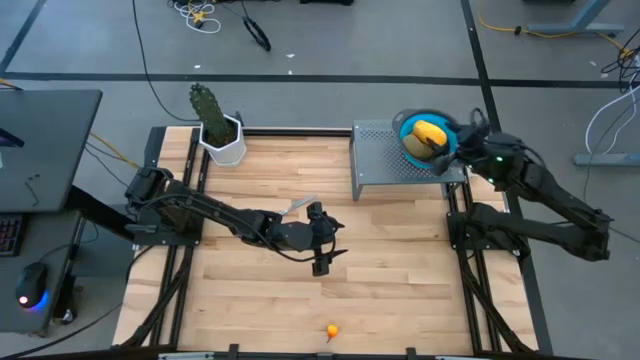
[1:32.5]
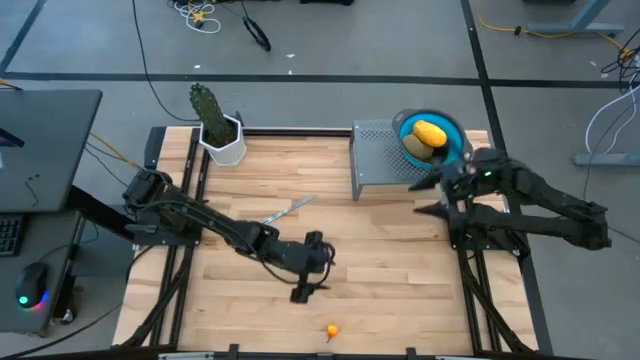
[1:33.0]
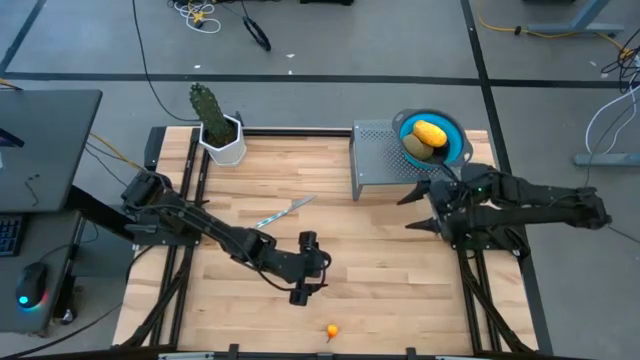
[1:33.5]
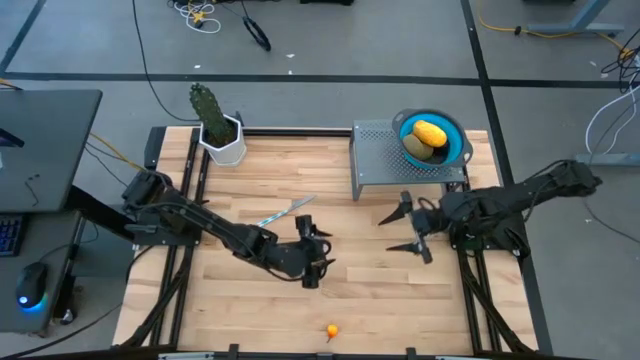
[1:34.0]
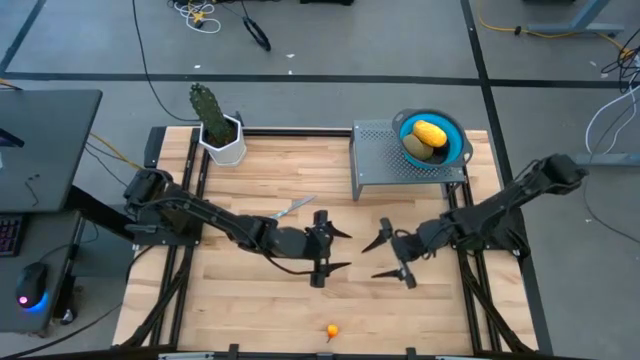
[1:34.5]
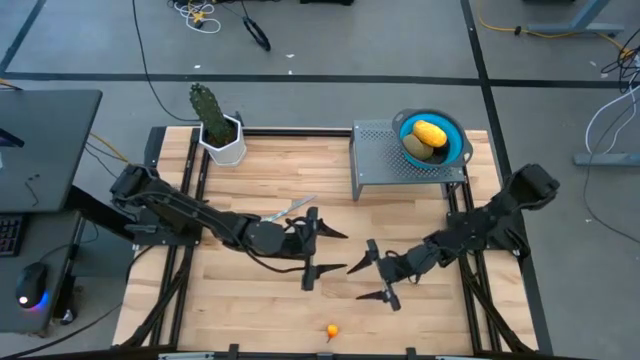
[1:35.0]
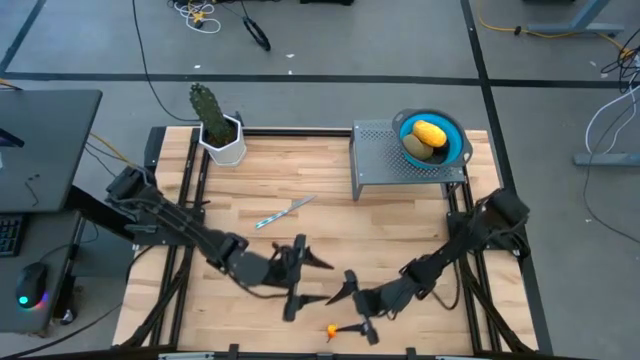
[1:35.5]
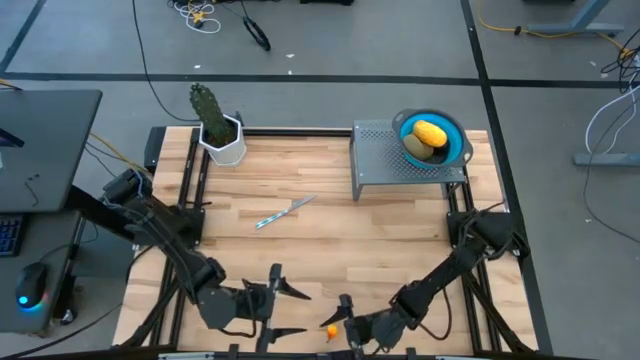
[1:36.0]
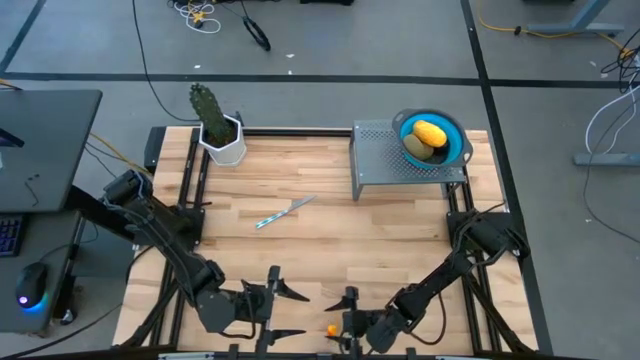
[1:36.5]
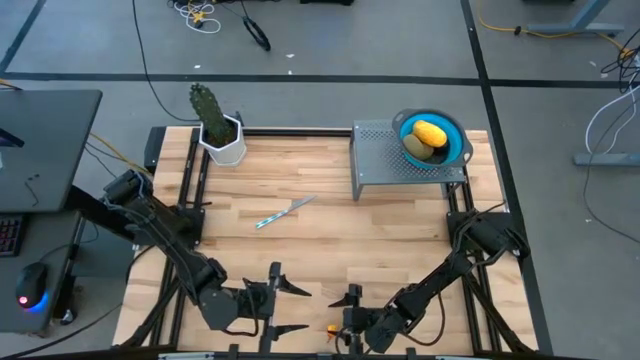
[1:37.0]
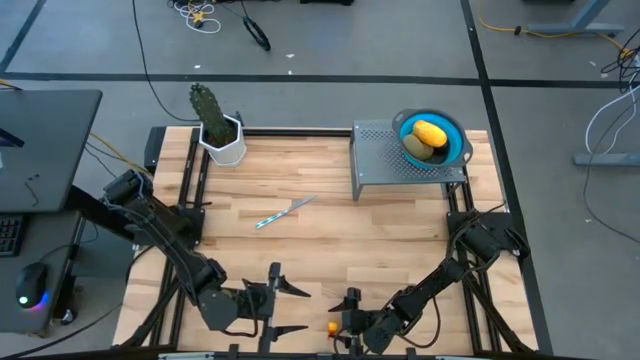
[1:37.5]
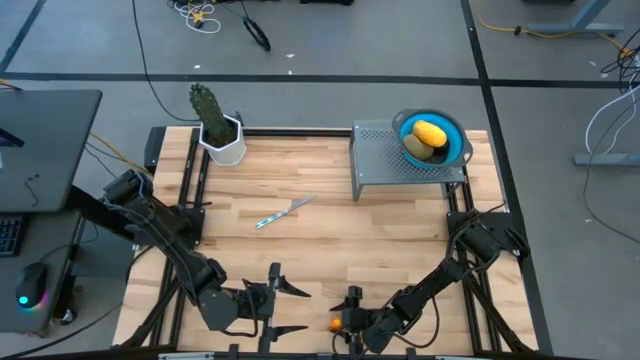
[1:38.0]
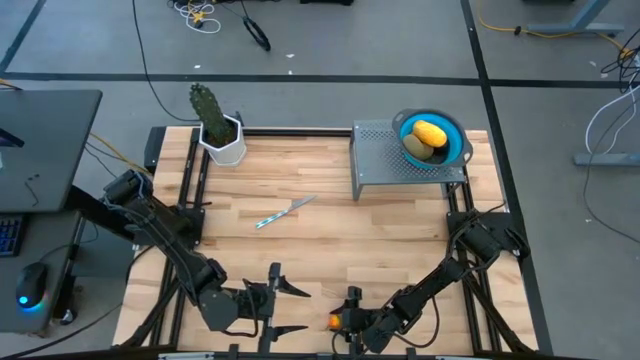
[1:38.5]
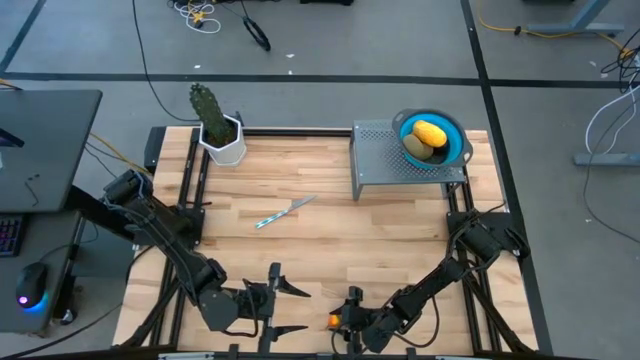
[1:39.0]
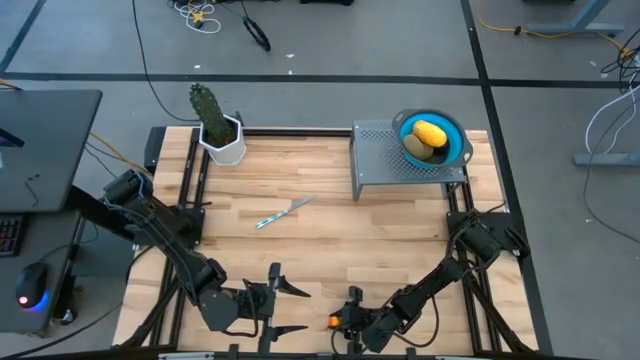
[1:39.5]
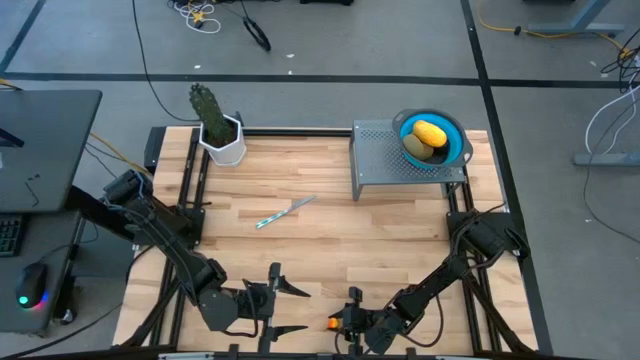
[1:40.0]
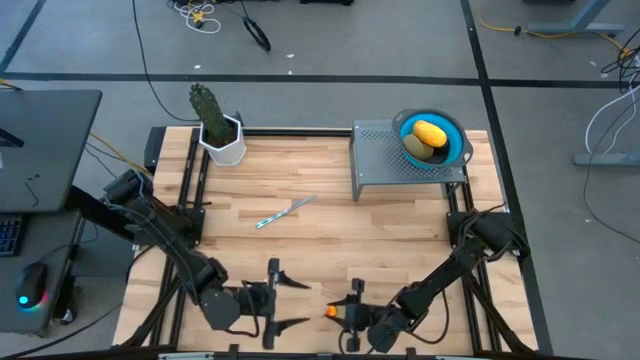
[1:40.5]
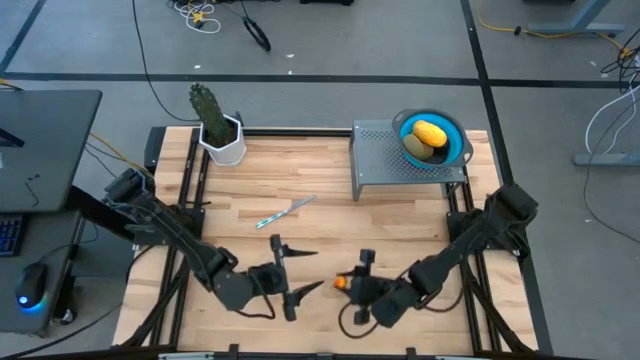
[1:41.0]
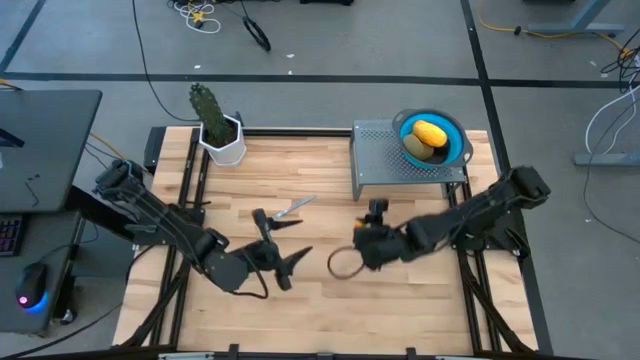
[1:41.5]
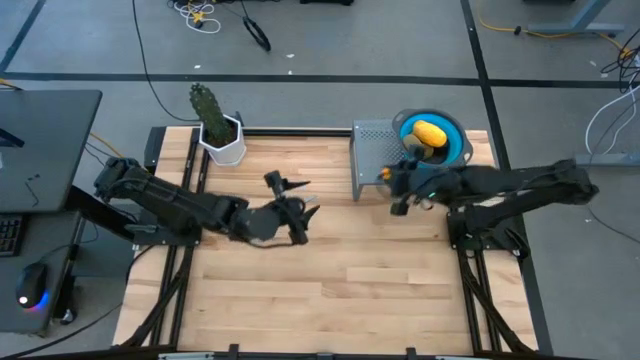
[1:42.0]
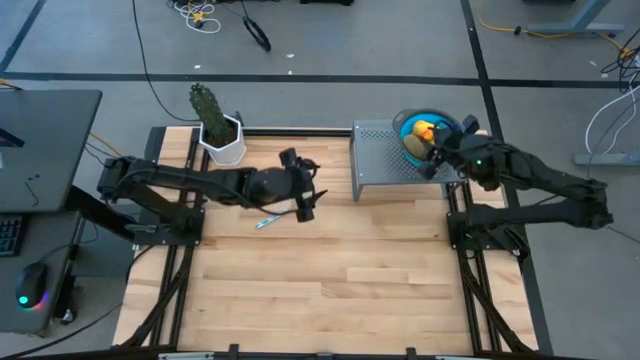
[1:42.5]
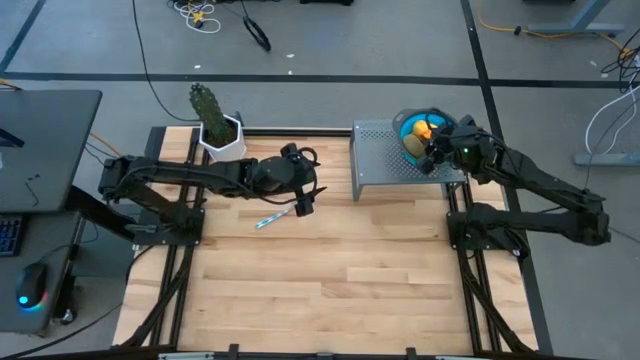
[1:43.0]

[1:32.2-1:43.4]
Task: Pick & Place Fruit
Put the pear into the blue strainer bowl on the shelf

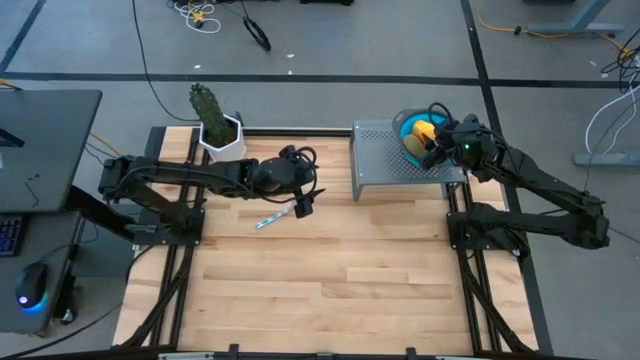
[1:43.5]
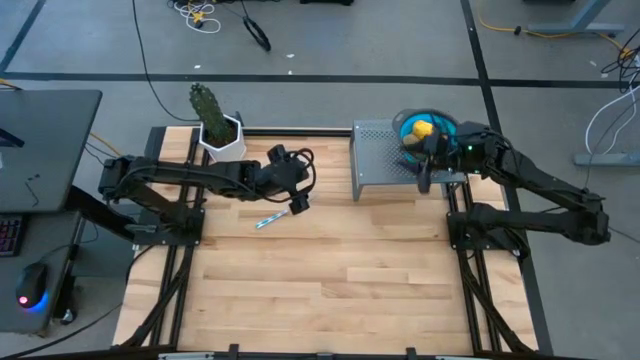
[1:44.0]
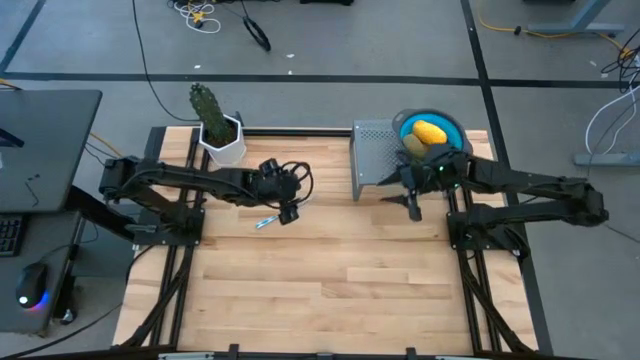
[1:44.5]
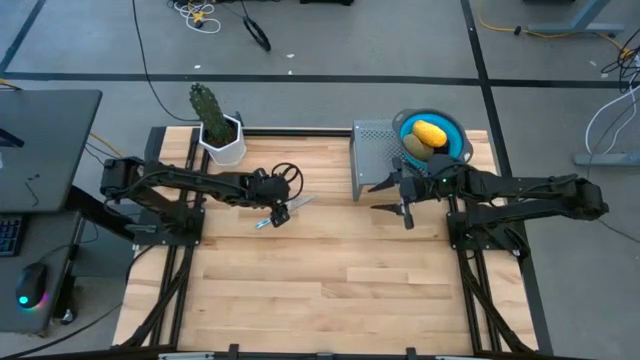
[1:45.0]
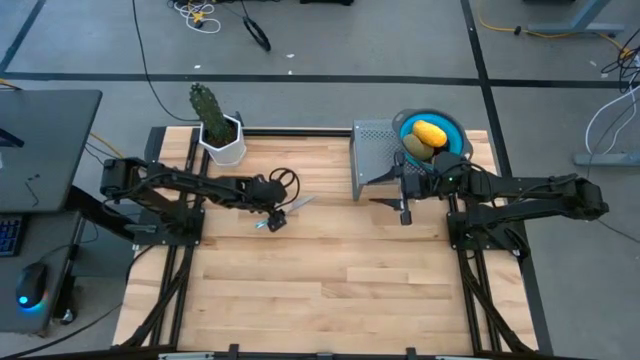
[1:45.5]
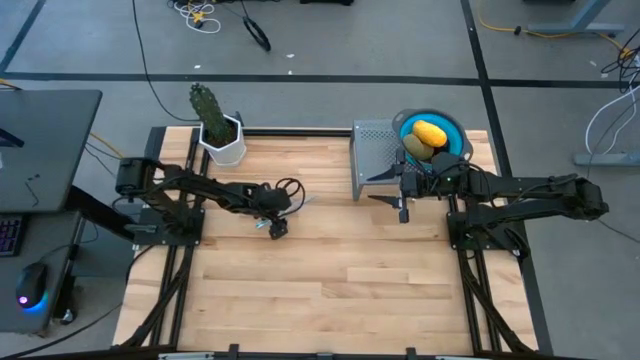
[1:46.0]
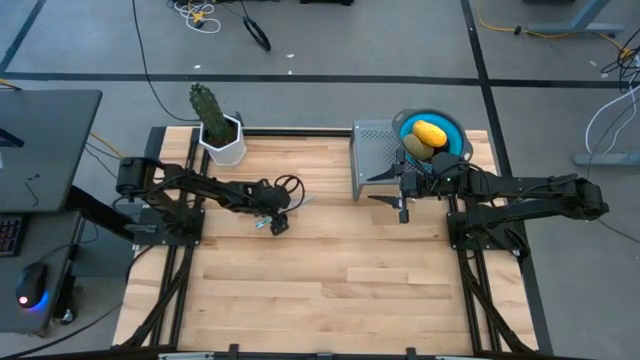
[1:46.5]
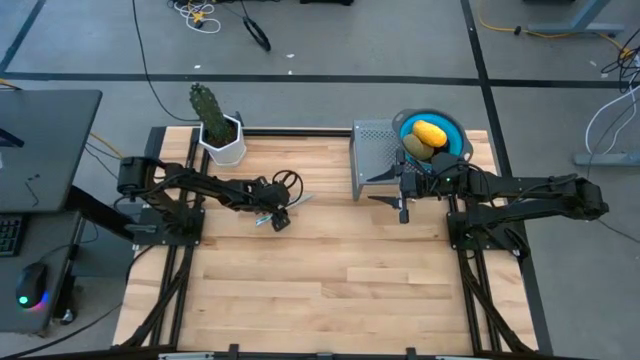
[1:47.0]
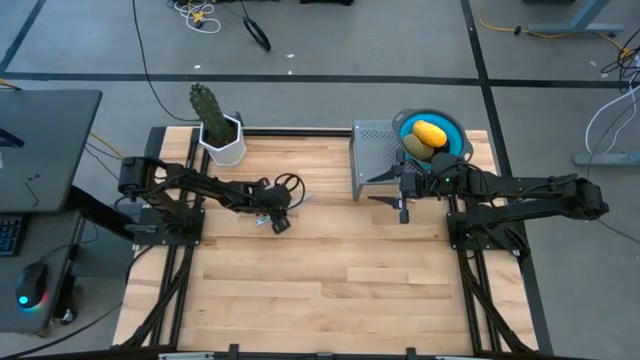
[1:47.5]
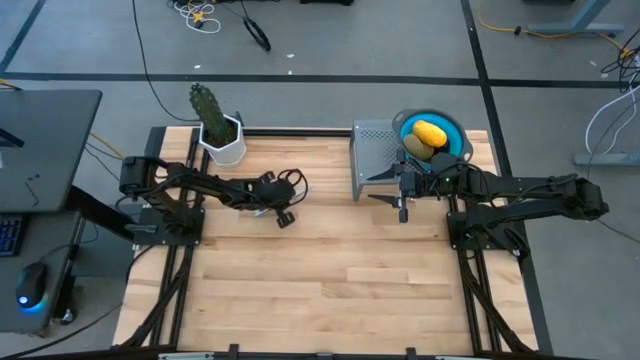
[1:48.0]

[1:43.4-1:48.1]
Put the knife to the left of the blue strainer bowl on the shelf

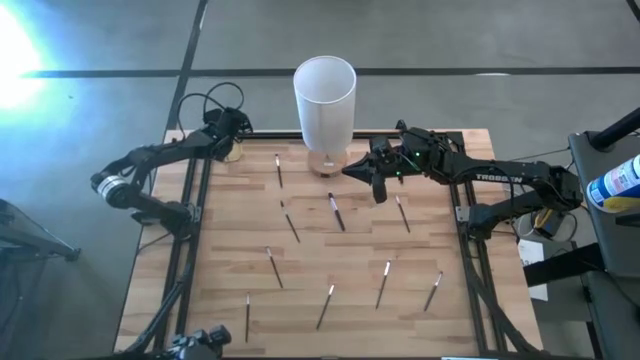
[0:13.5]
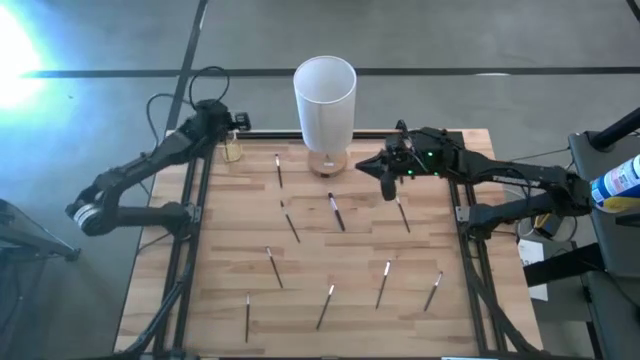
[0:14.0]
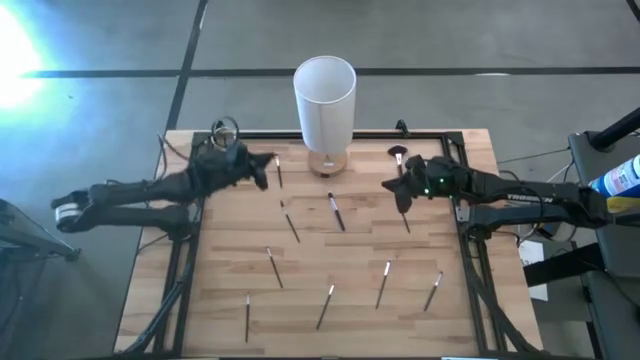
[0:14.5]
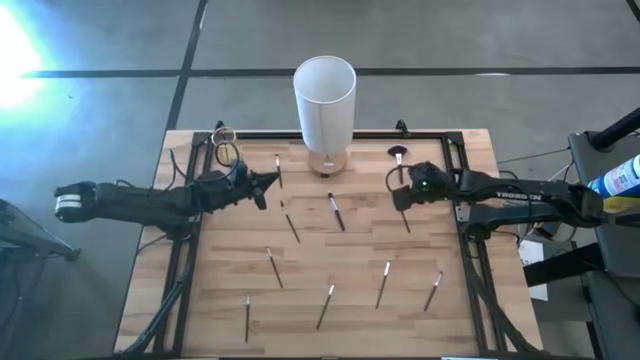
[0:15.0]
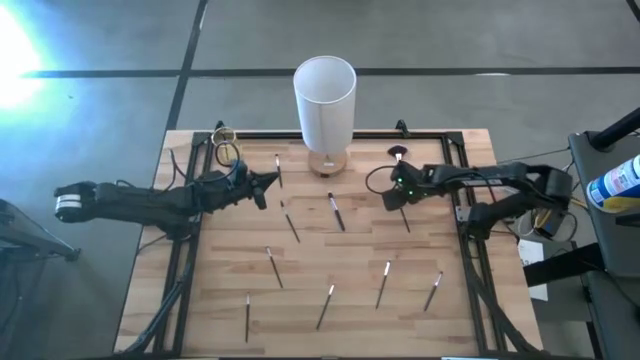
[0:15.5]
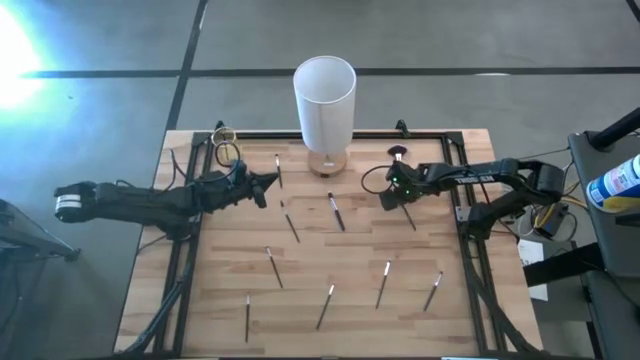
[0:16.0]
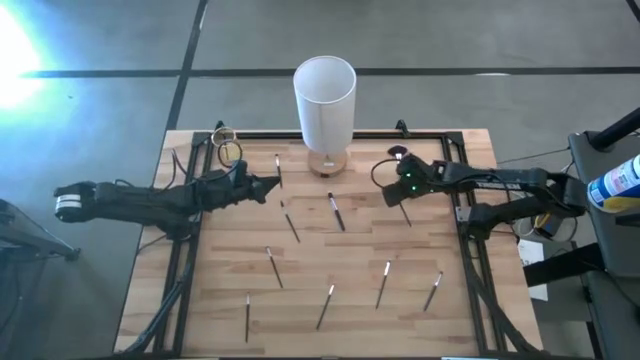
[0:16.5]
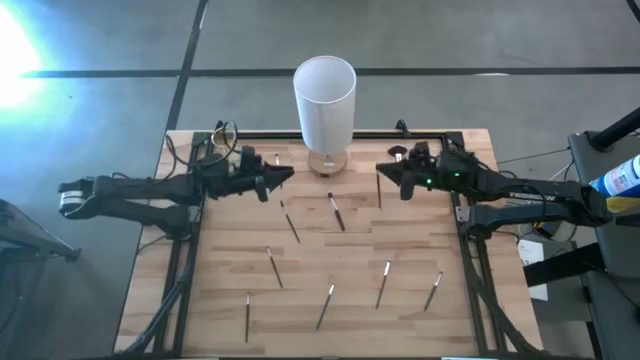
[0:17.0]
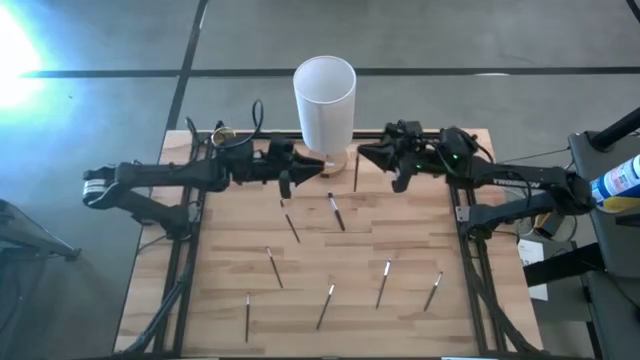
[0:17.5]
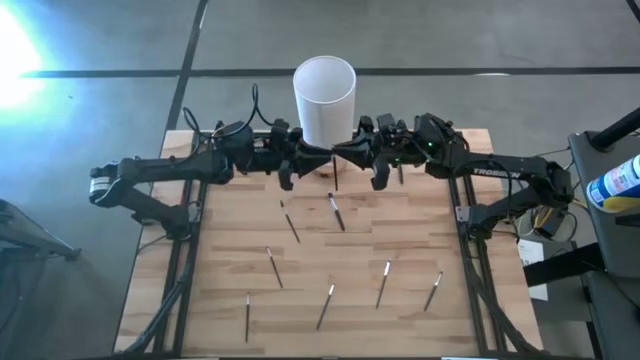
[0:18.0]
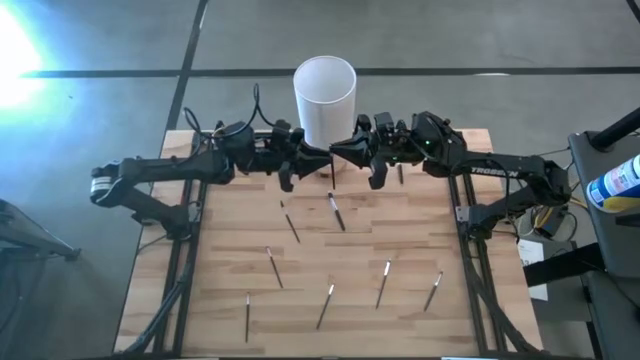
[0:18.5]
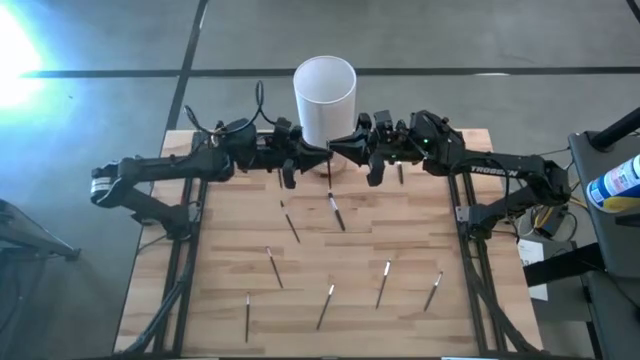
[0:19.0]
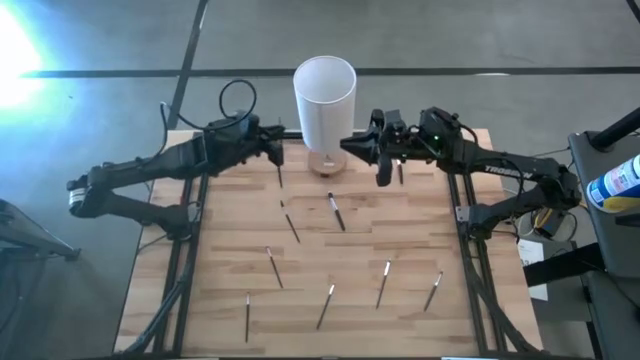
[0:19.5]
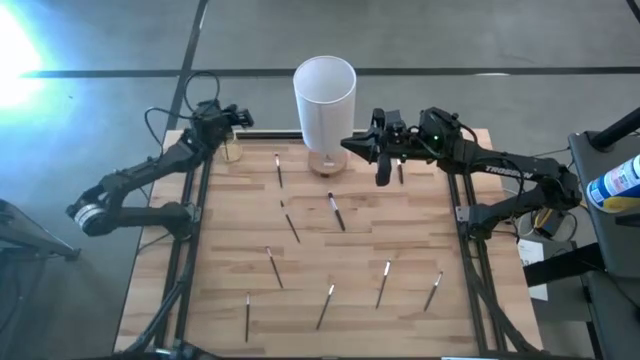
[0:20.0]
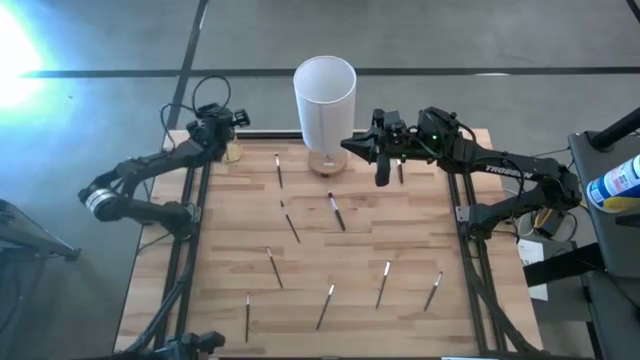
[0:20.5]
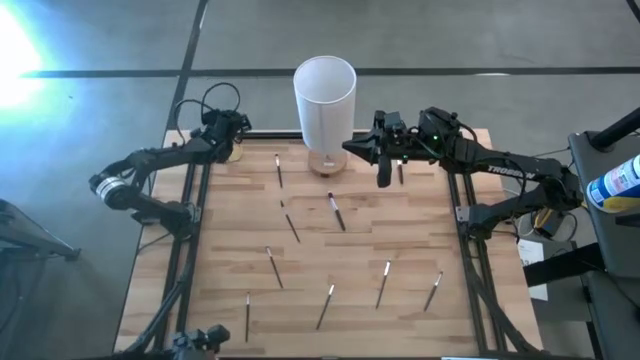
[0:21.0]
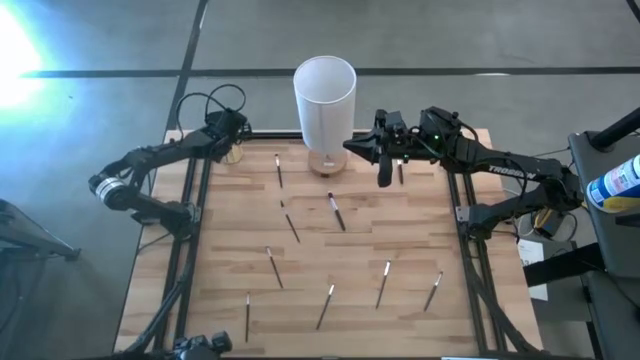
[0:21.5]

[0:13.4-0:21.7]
Task: Pick & Place Makeup Brushes
Put the liner brush into the makeup holder
